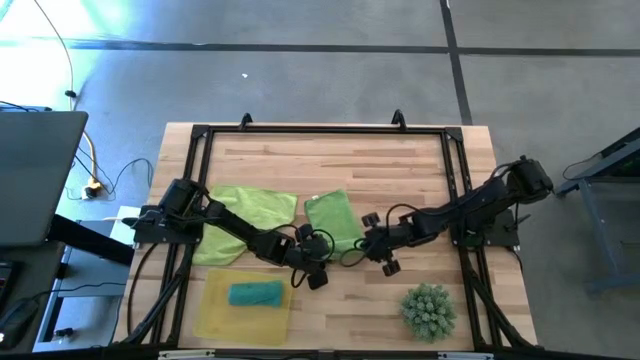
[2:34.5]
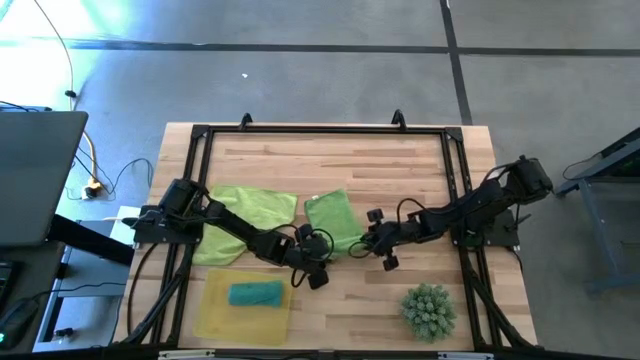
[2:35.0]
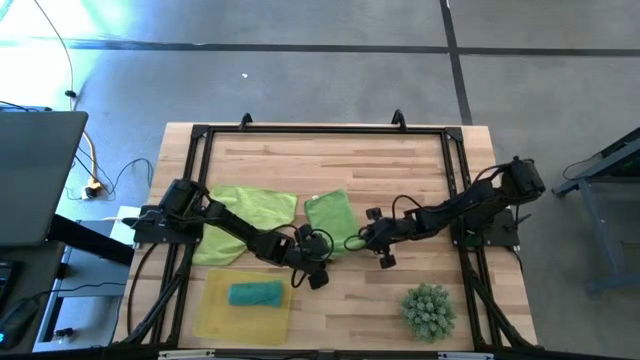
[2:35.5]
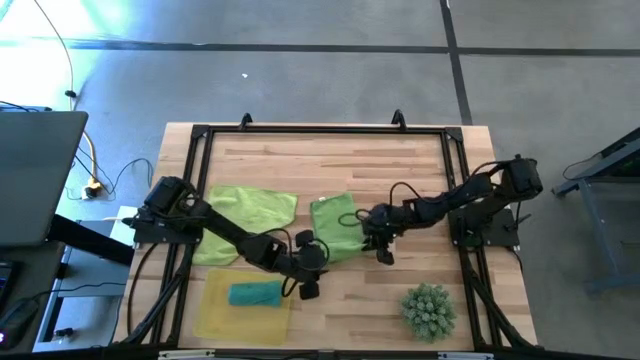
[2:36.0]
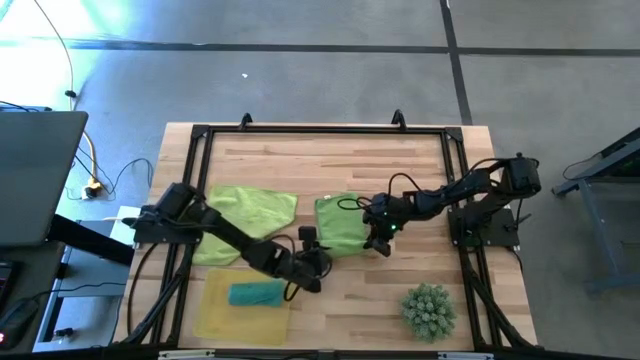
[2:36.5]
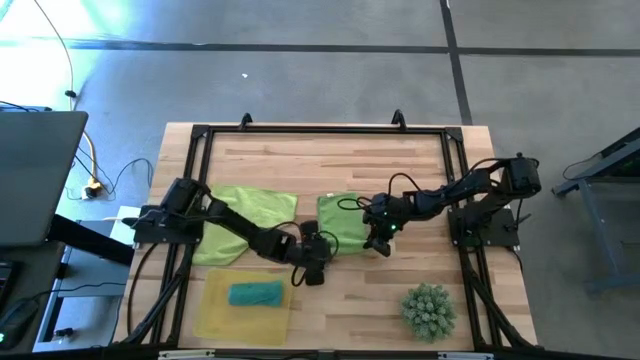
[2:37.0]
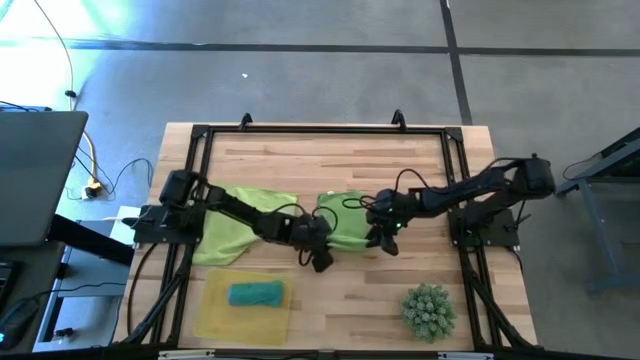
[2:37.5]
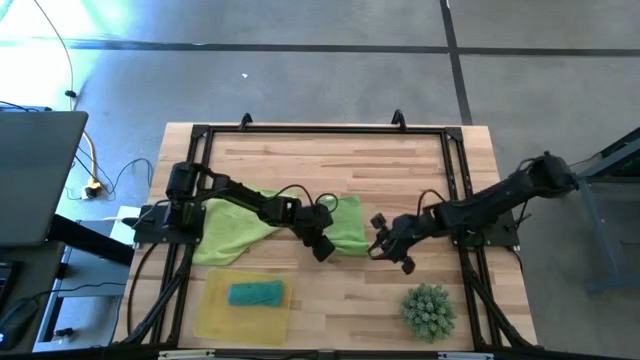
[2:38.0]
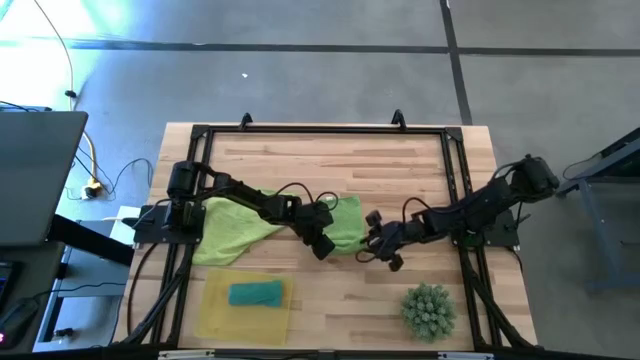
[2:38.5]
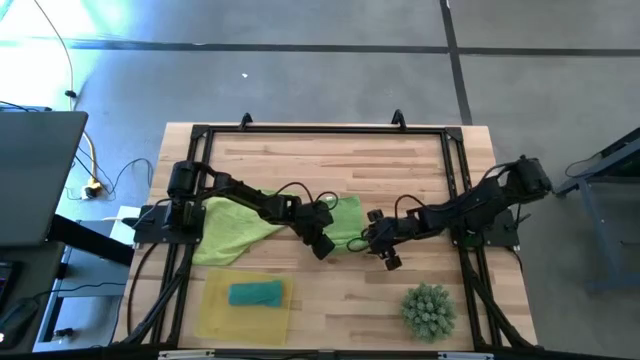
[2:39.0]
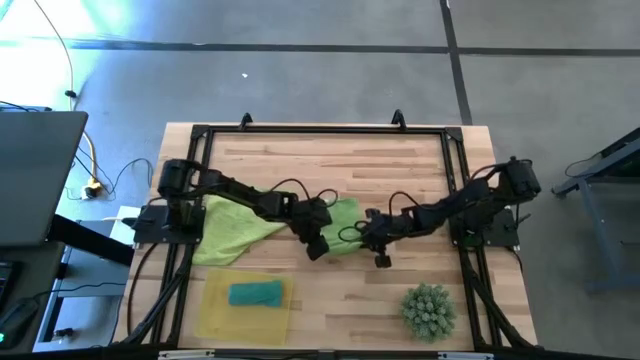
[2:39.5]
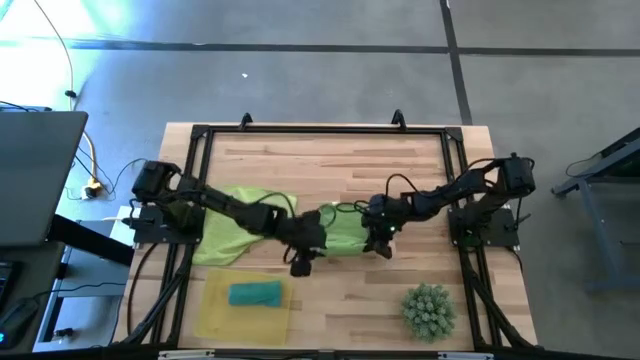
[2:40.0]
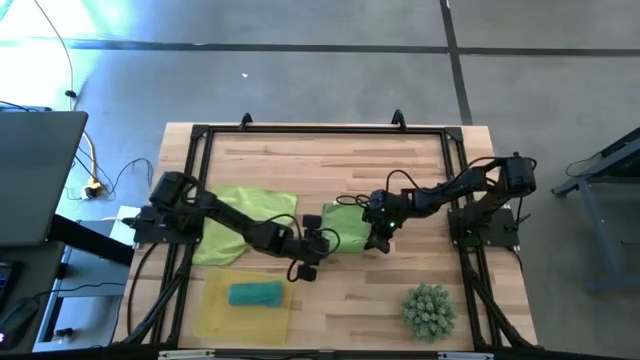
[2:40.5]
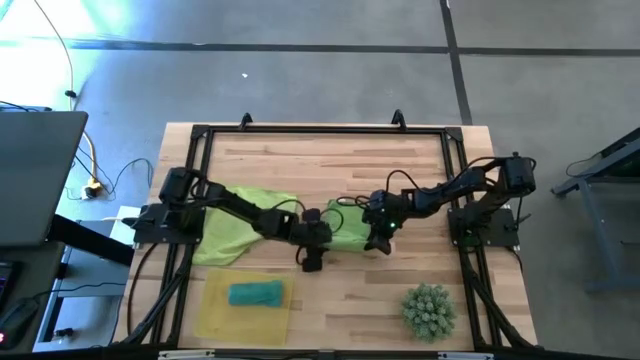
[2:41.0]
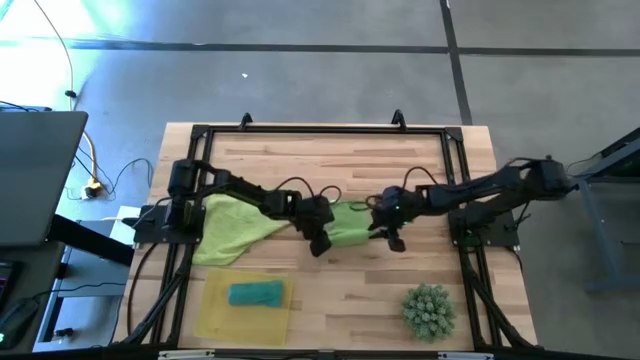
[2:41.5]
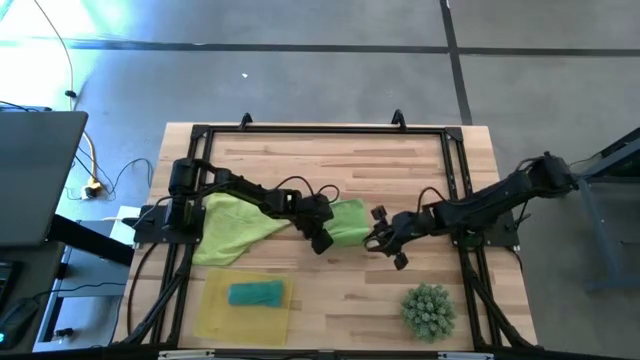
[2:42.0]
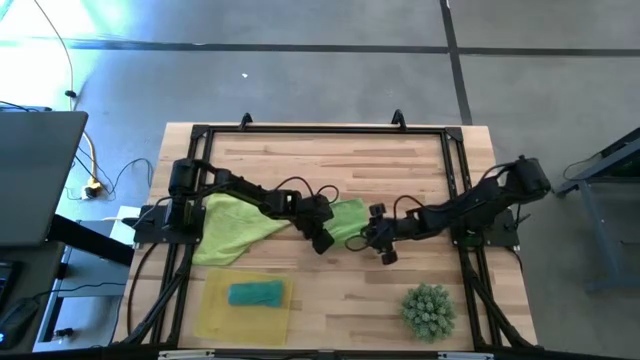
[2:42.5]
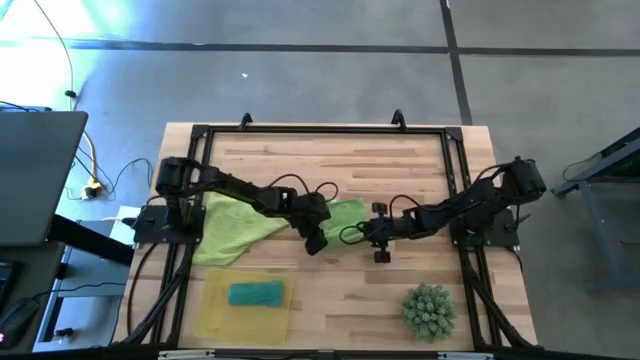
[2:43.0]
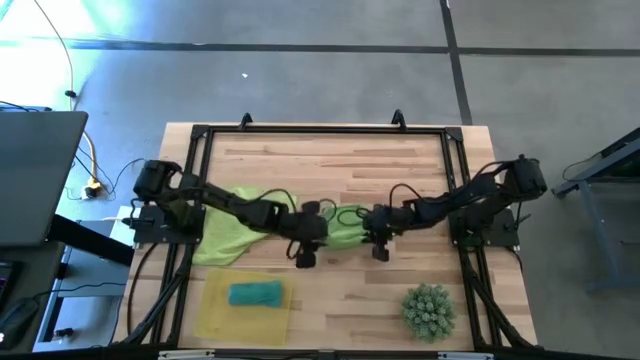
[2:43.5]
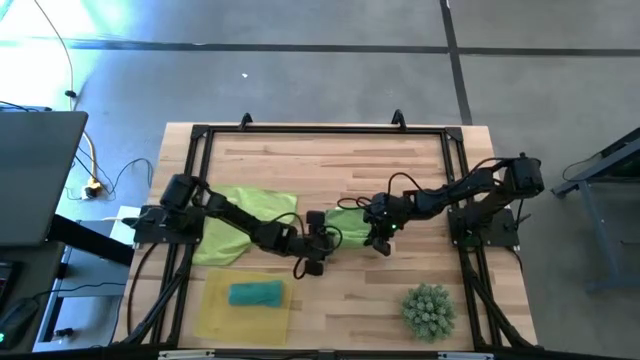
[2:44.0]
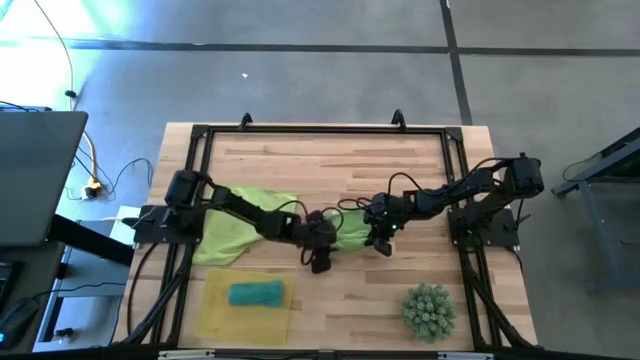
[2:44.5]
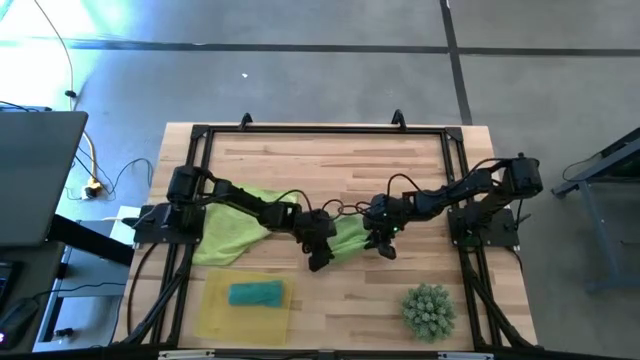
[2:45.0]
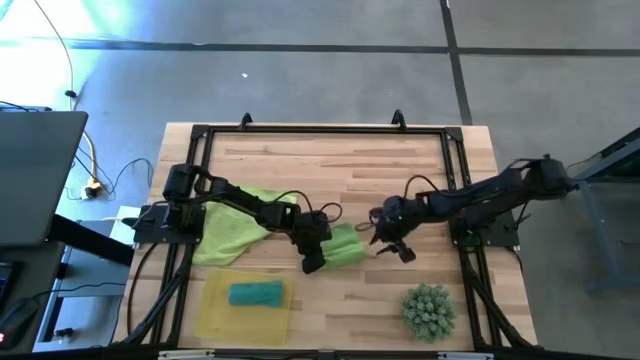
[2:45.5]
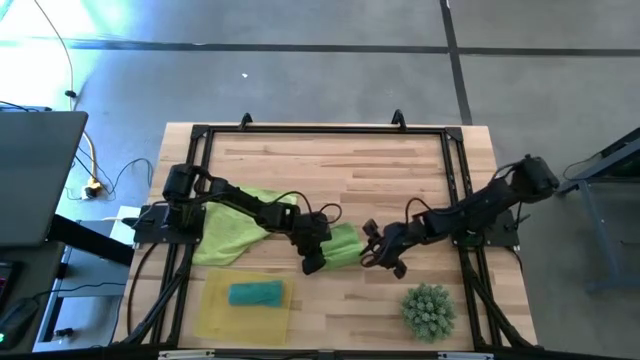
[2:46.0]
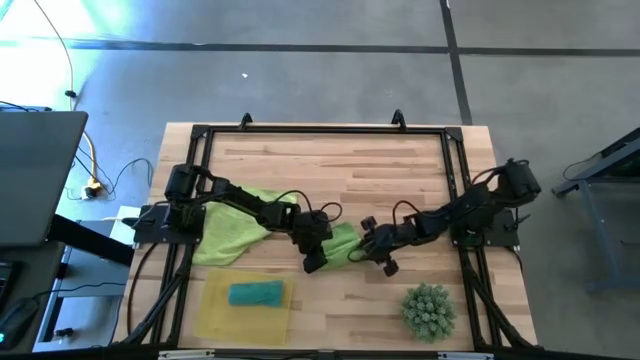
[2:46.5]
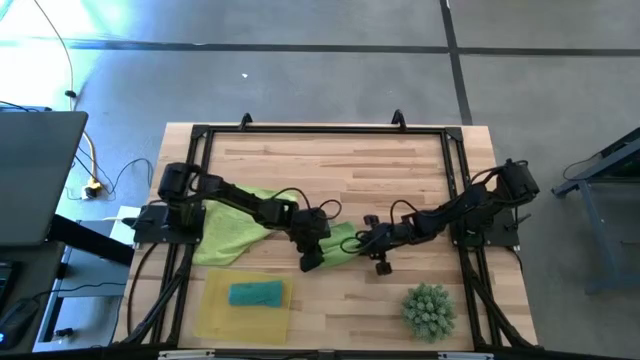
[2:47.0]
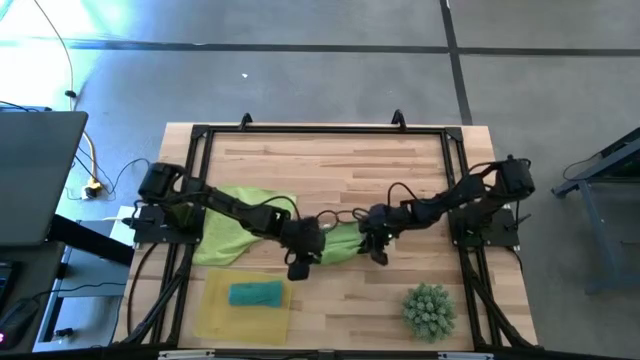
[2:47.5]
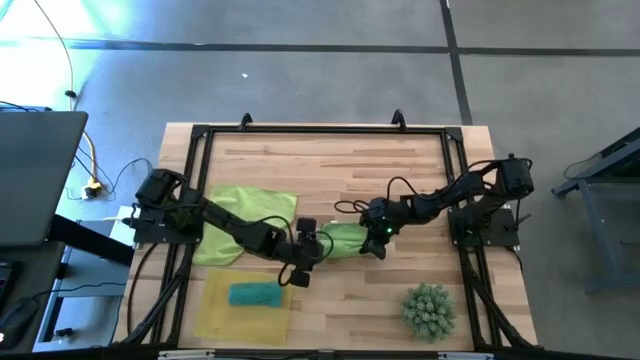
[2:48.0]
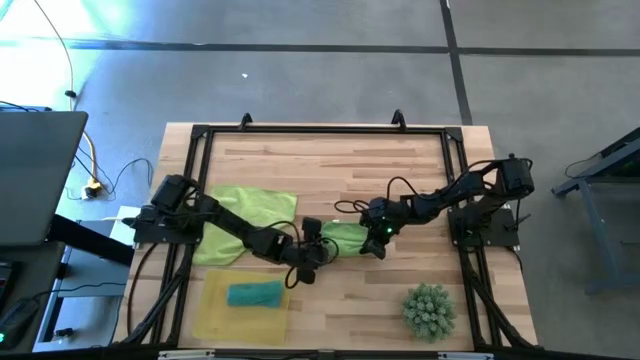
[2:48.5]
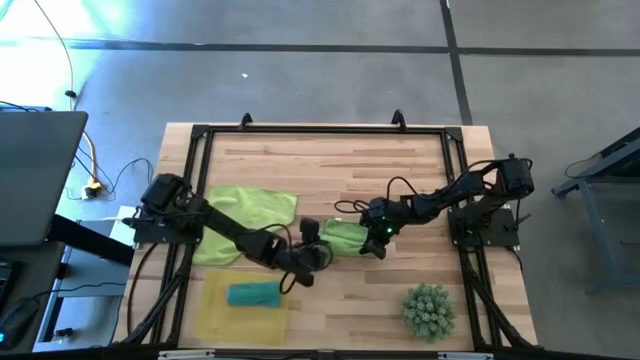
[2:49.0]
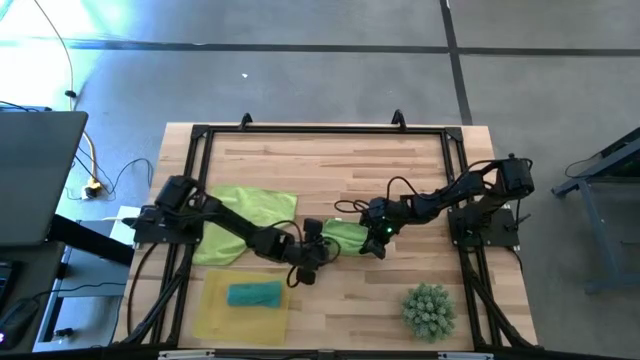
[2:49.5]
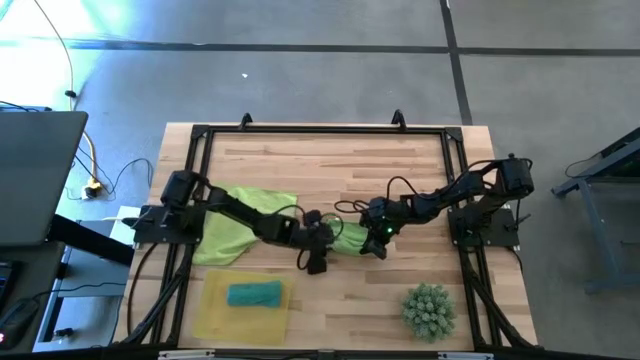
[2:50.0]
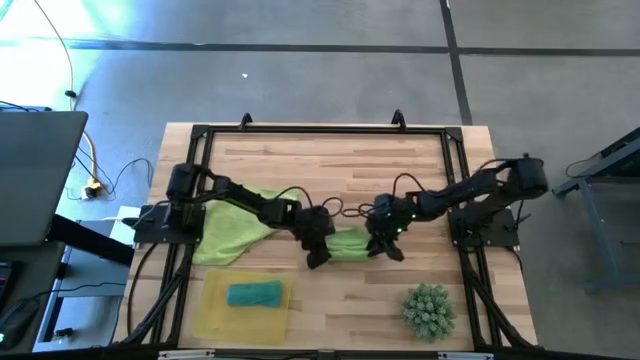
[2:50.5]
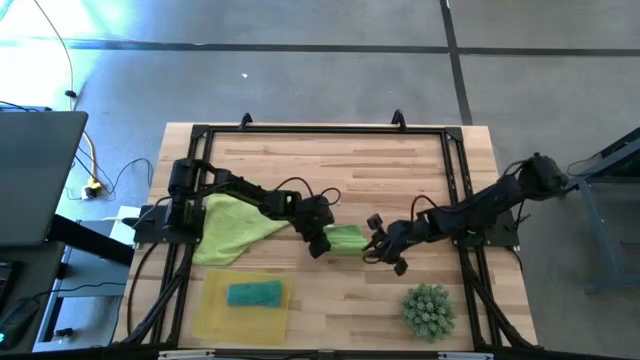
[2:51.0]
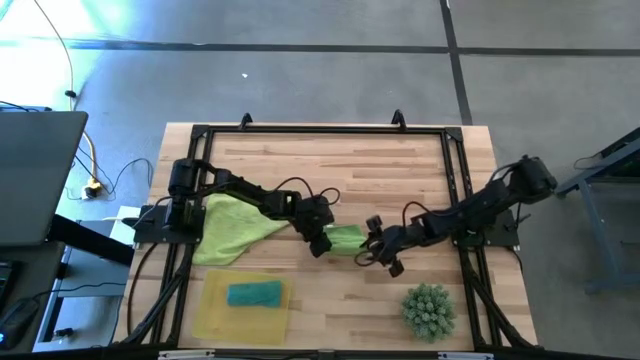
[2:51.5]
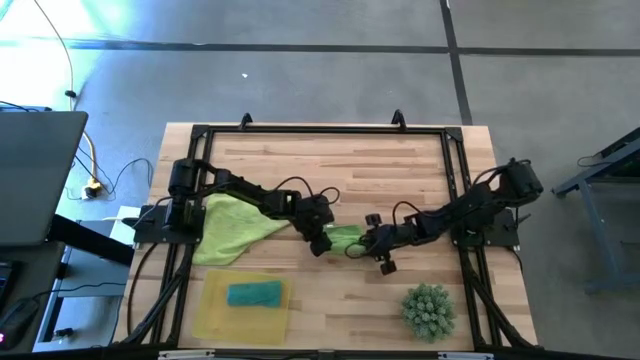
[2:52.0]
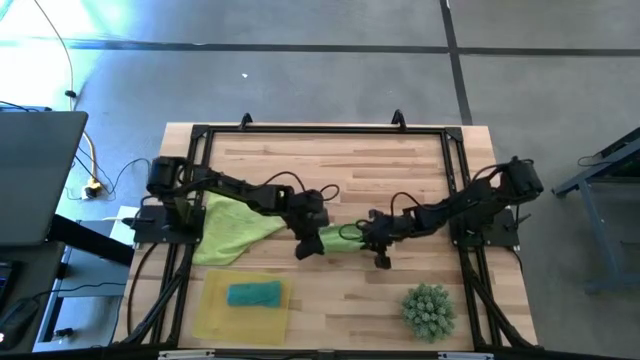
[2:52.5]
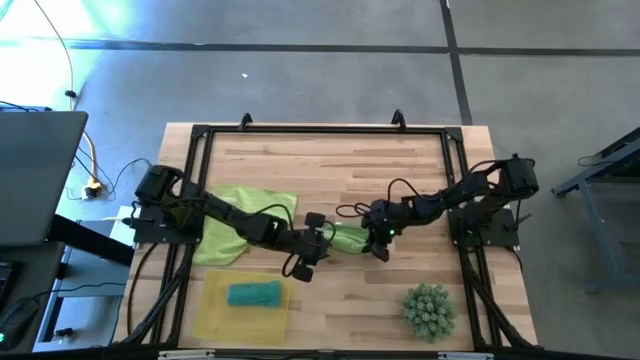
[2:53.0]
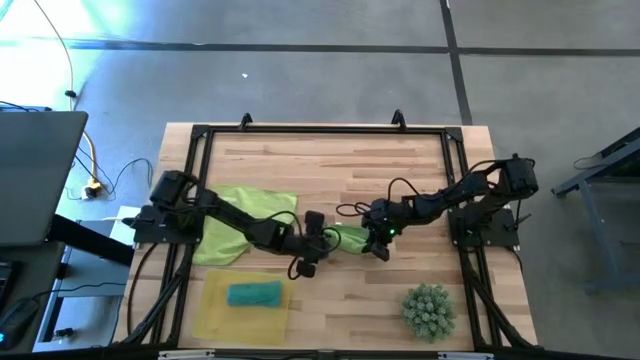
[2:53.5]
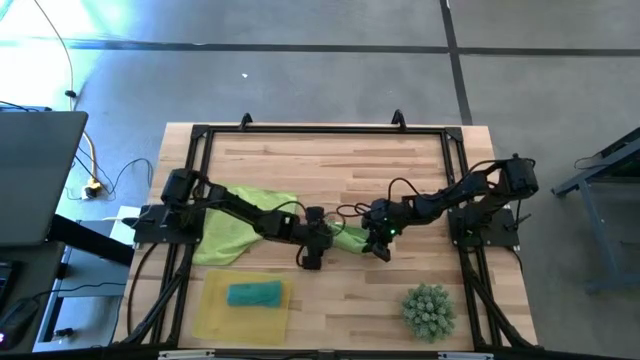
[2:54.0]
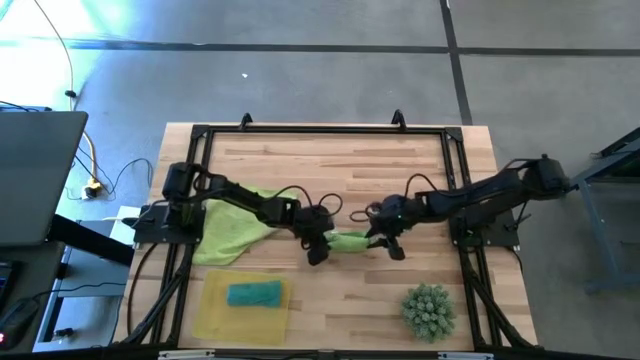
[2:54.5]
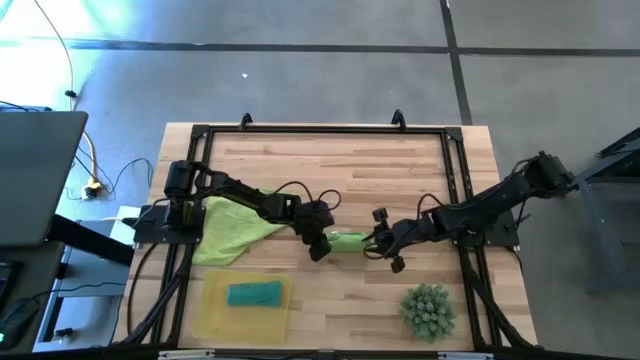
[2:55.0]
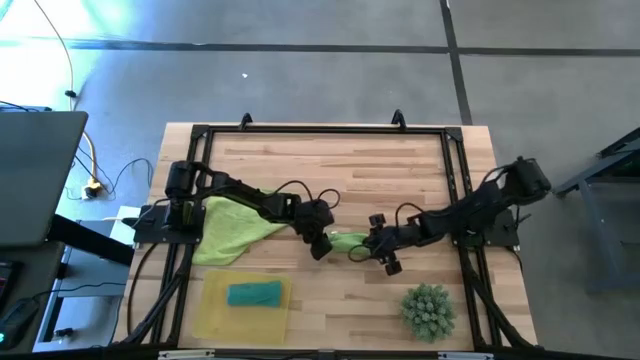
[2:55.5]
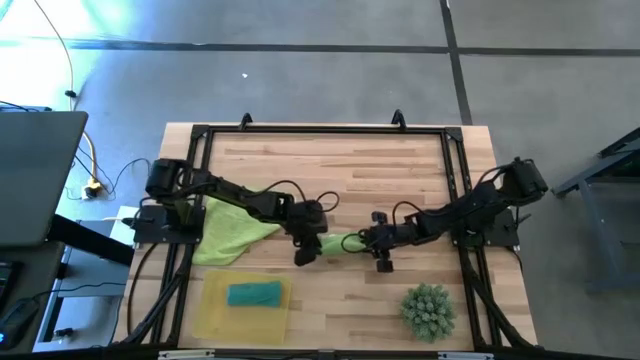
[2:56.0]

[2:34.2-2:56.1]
Task: Roll microfiber towels into tight, uniform cylinder then place into a basket
Roll the green microfiber towel
